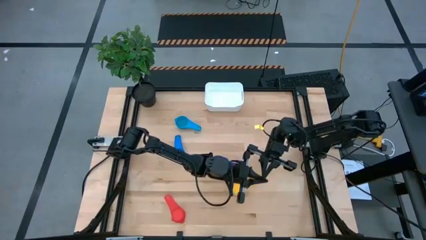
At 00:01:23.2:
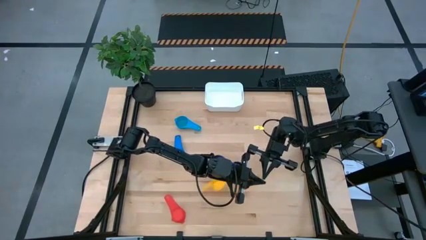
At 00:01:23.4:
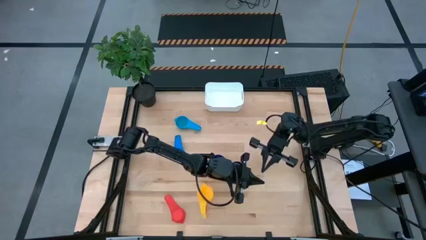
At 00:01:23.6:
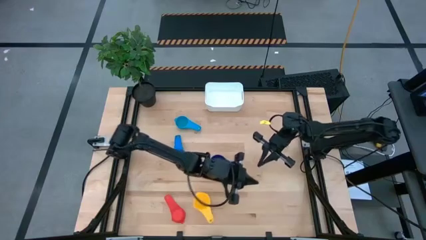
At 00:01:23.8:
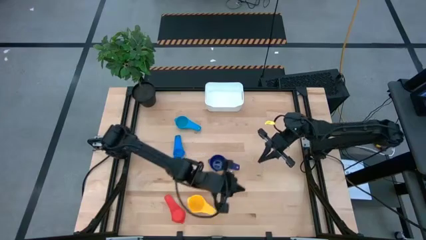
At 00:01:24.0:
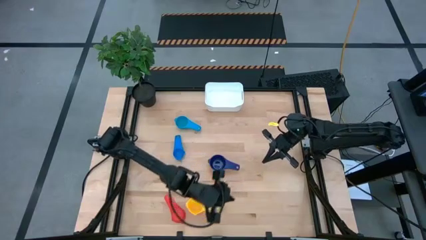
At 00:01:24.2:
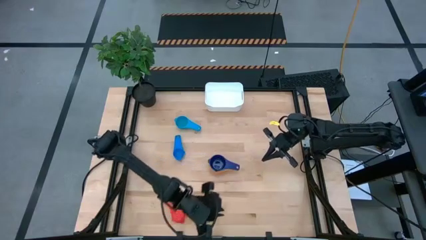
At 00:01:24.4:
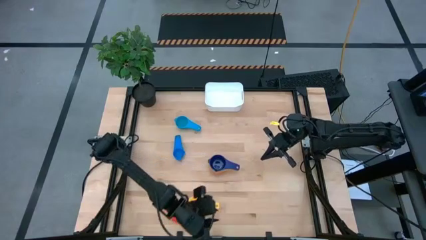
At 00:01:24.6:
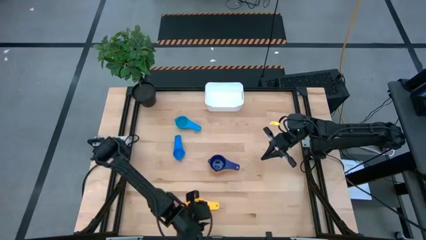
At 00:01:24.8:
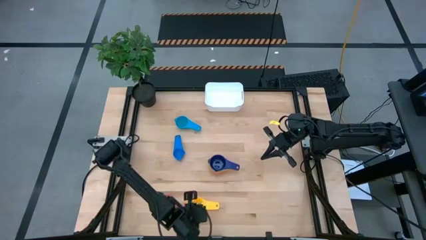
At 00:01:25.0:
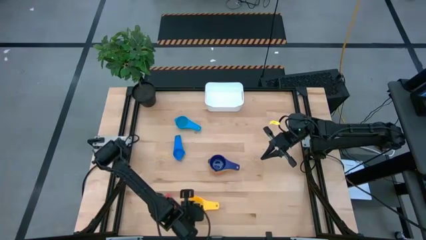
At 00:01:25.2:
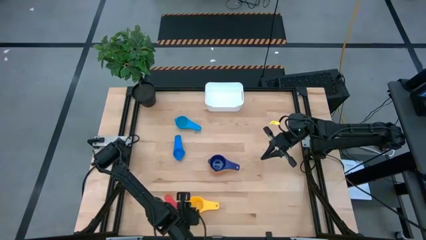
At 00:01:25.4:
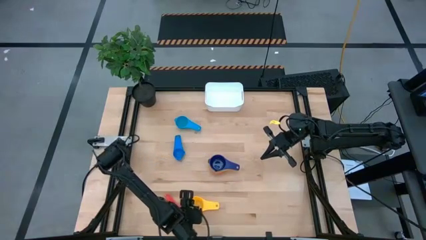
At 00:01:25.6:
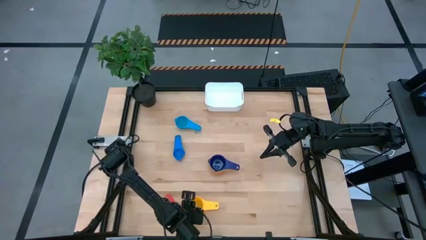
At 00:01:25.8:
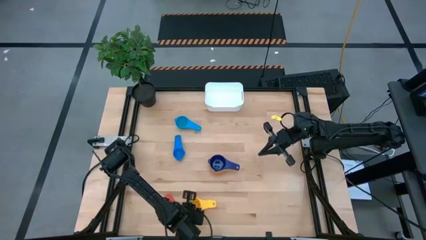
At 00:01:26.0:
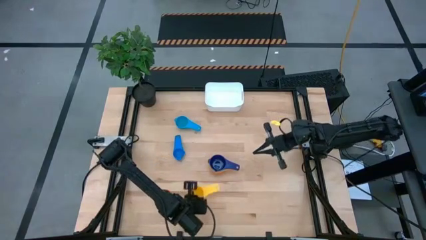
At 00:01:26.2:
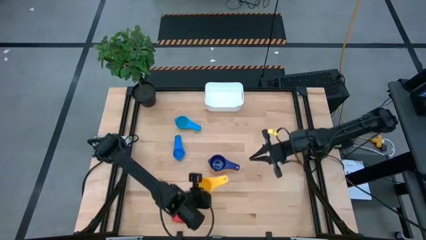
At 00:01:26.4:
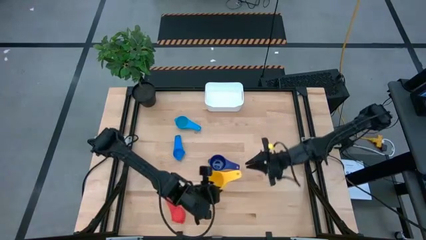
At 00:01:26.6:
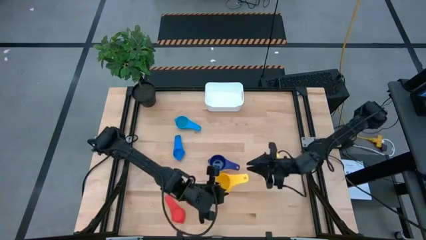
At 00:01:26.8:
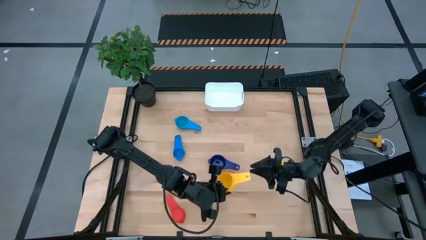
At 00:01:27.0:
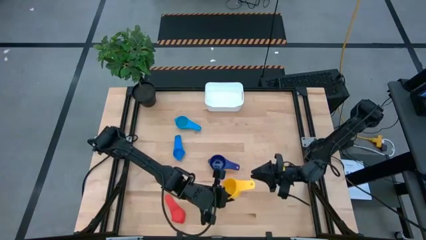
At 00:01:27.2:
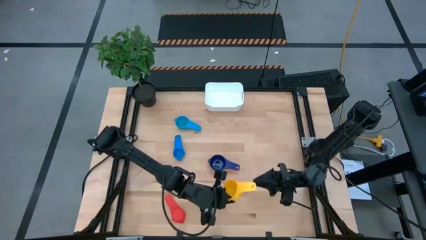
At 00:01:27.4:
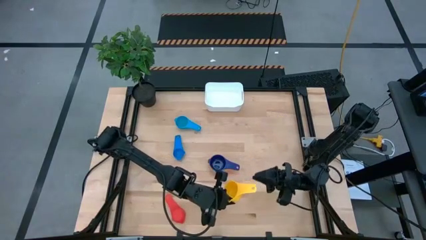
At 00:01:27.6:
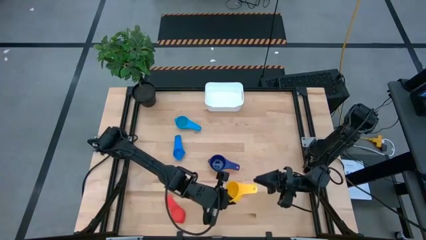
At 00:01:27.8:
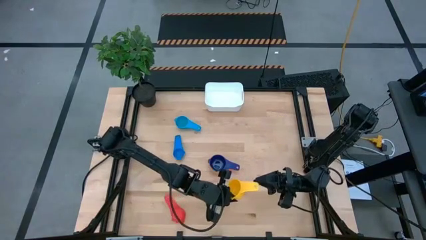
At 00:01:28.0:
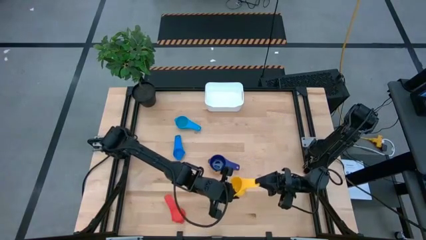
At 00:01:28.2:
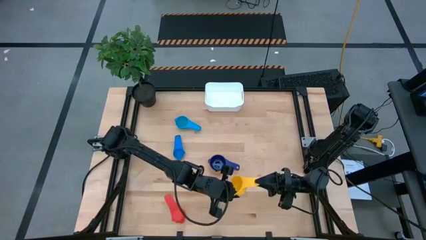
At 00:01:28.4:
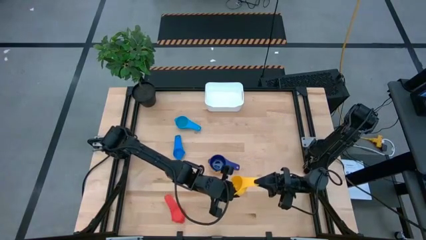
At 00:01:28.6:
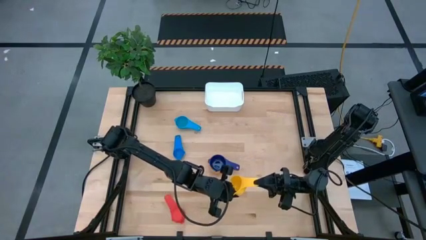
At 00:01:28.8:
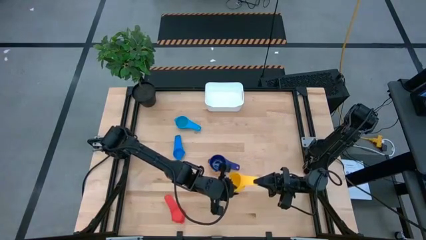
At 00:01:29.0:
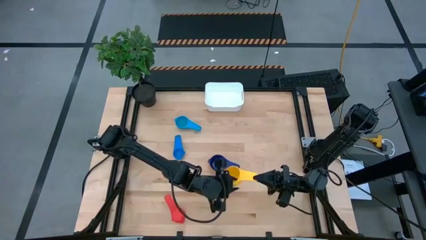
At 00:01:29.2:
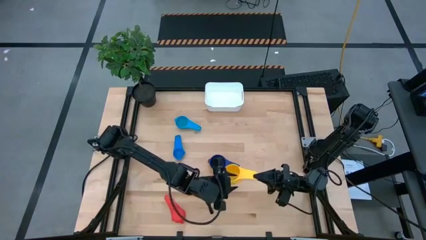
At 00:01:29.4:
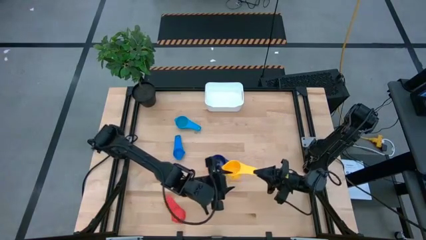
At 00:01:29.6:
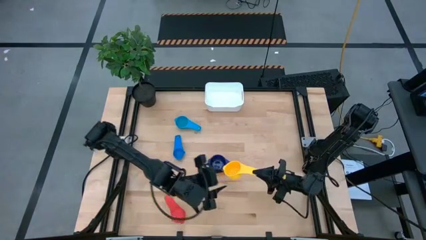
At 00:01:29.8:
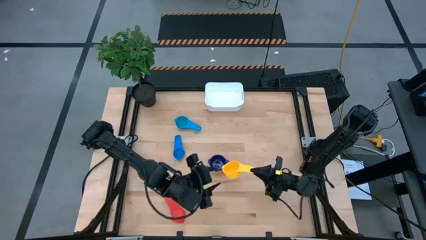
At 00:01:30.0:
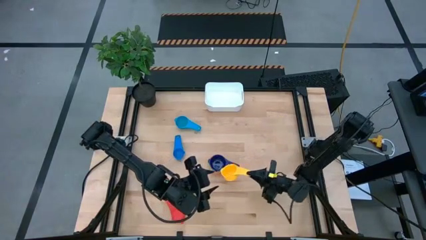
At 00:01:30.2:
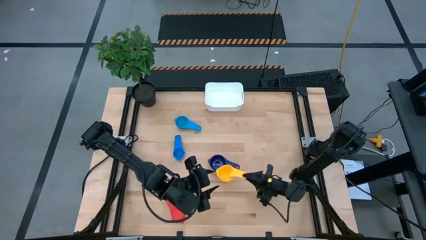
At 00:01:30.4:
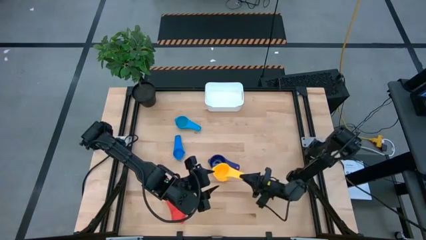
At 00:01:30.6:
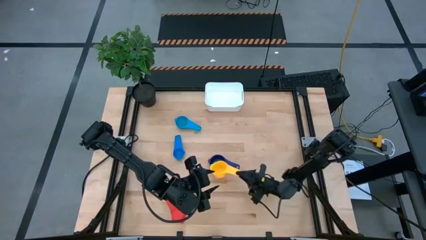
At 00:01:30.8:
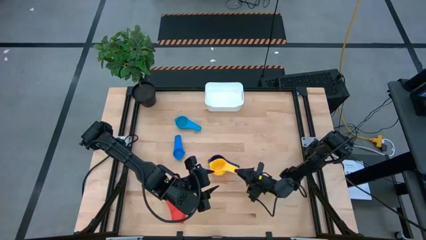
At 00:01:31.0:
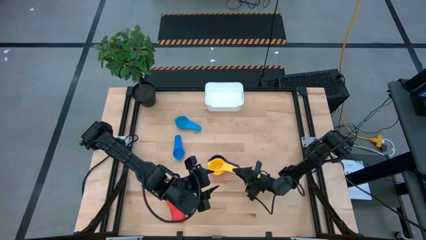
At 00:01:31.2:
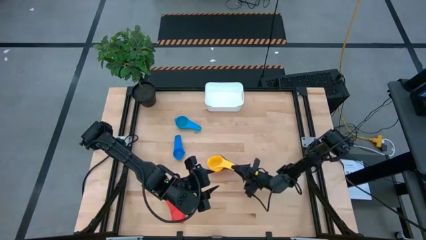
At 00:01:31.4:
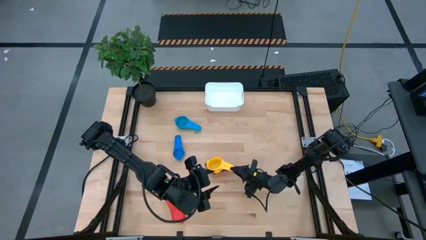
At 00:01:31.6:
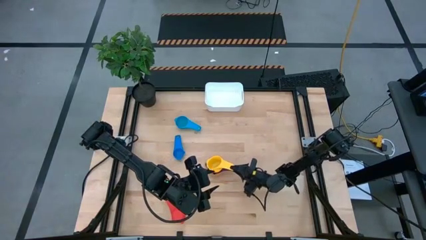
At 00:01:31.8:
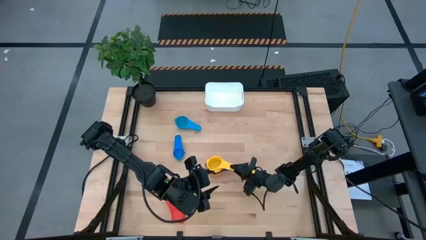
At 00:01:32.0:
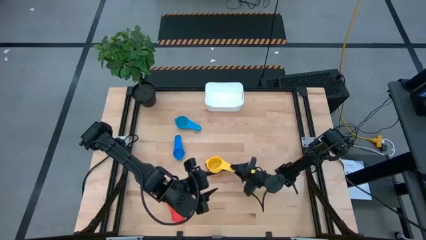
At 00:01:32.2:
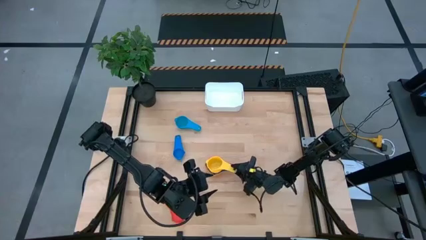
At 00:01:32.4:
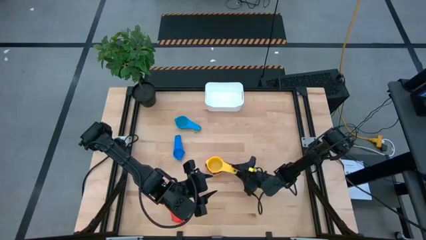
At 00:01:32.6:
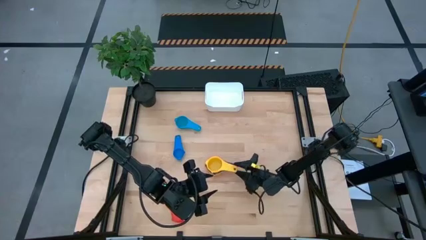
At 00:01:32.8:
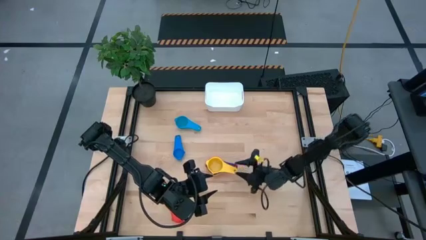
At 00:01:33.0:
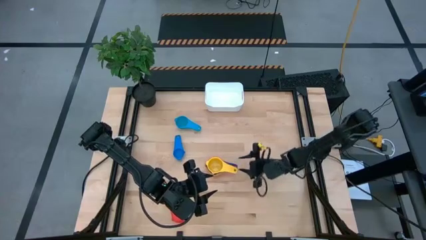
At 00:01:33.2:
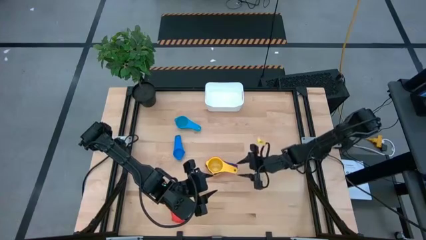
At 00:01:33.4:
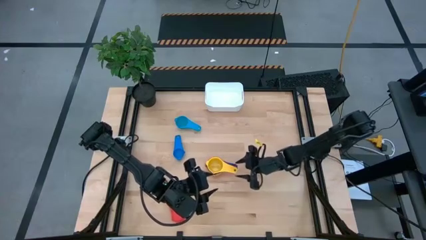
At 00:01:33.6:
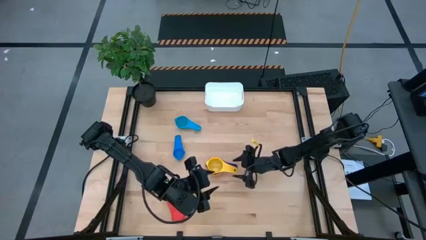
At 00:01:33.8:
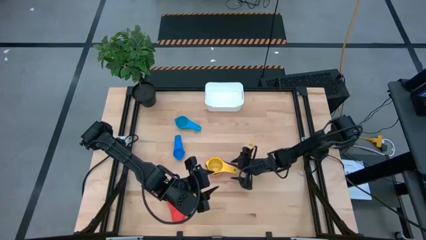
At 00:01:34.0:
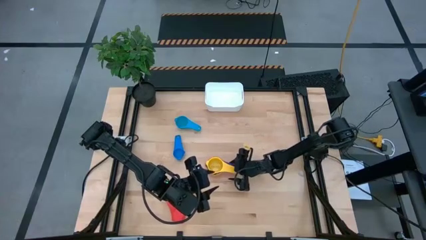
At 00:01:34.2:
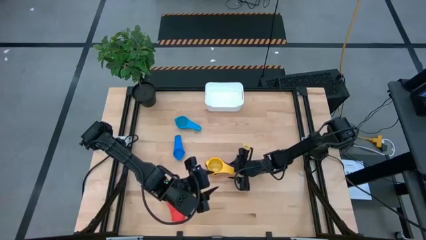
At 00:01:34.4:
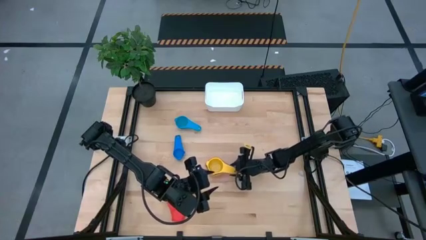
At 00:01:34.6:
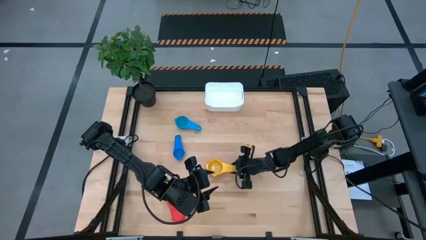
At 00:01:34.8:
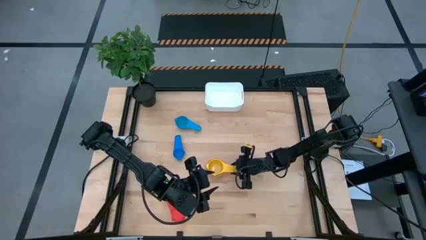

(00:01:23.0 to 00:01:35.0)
Task: Nest measuring cups in basket
Stack the yellow measuring cup on top of the dark blue measuring cup

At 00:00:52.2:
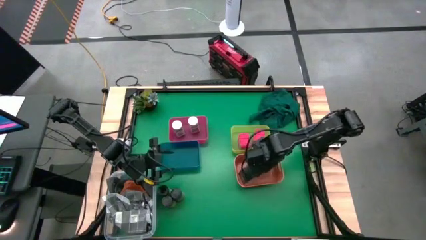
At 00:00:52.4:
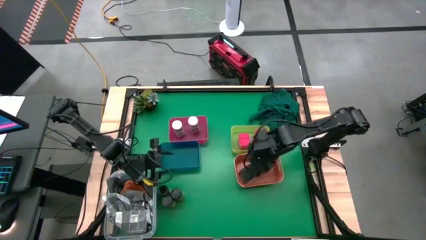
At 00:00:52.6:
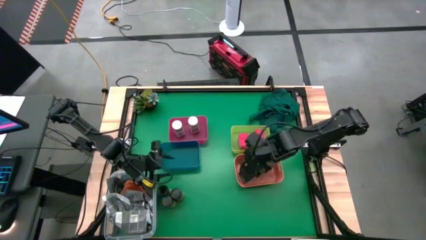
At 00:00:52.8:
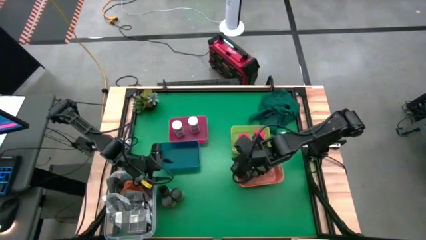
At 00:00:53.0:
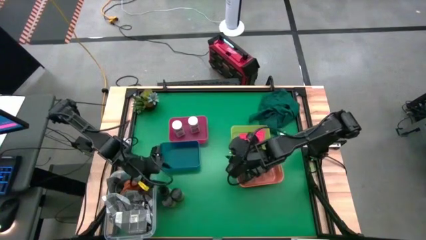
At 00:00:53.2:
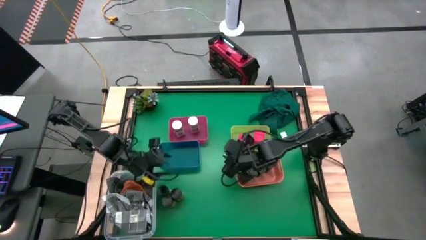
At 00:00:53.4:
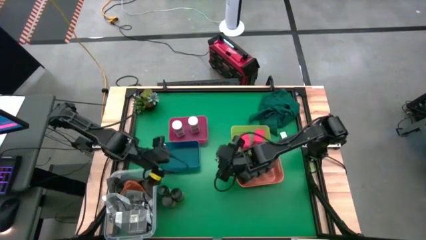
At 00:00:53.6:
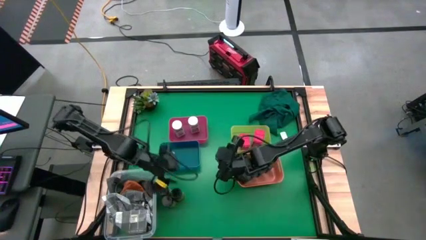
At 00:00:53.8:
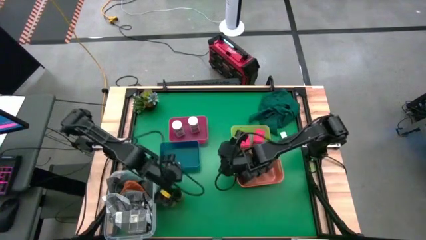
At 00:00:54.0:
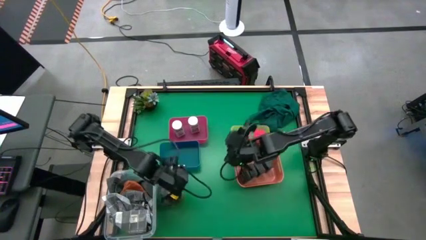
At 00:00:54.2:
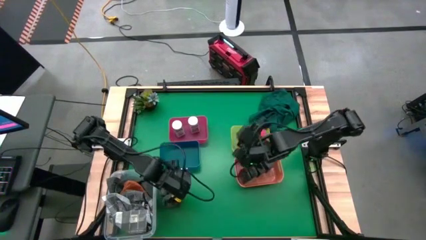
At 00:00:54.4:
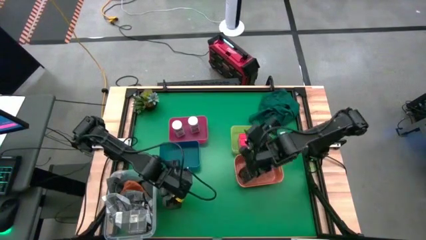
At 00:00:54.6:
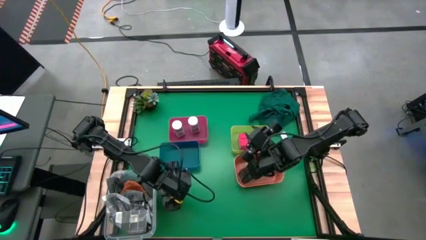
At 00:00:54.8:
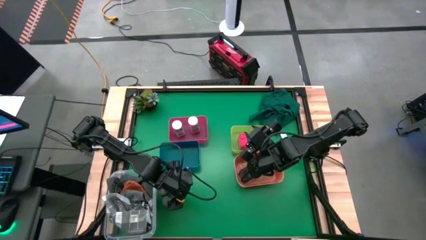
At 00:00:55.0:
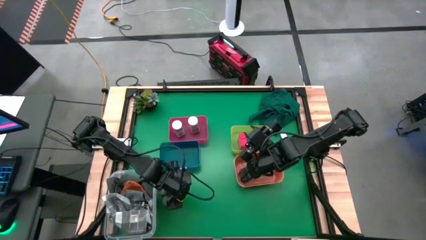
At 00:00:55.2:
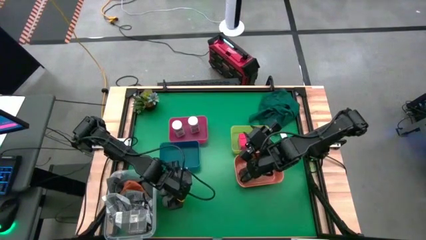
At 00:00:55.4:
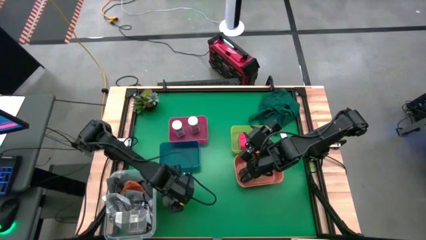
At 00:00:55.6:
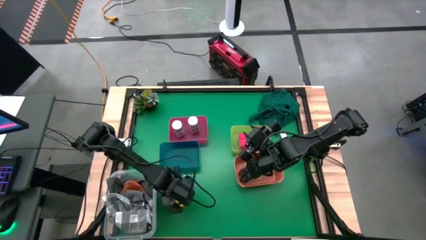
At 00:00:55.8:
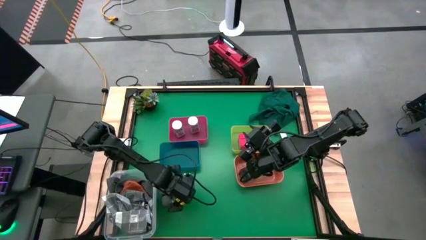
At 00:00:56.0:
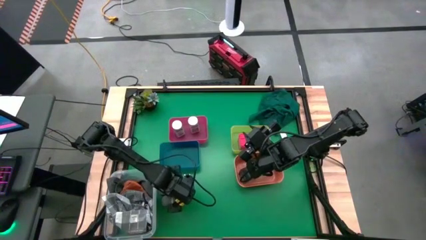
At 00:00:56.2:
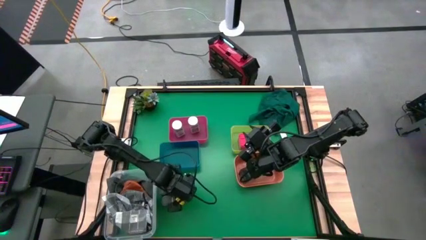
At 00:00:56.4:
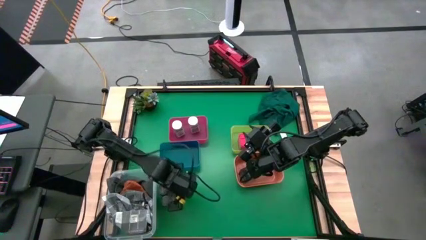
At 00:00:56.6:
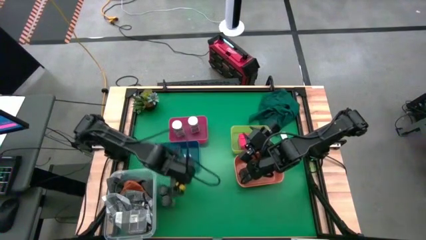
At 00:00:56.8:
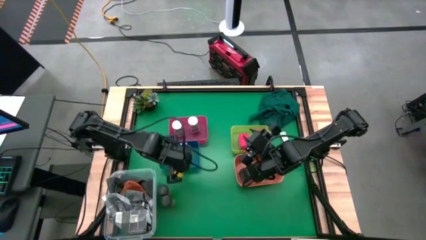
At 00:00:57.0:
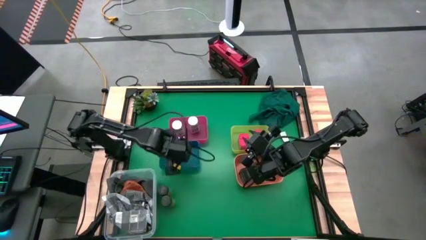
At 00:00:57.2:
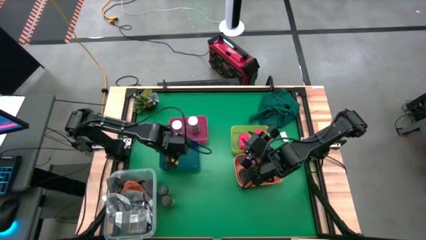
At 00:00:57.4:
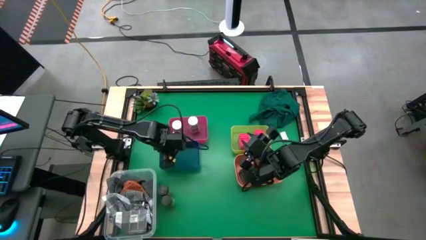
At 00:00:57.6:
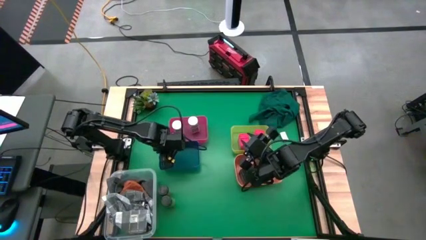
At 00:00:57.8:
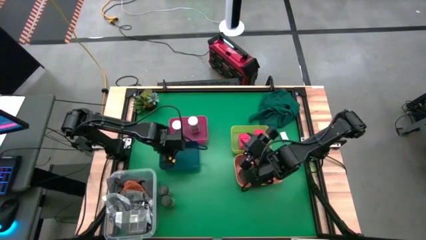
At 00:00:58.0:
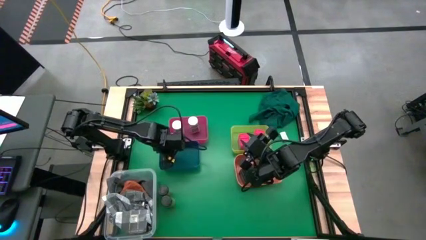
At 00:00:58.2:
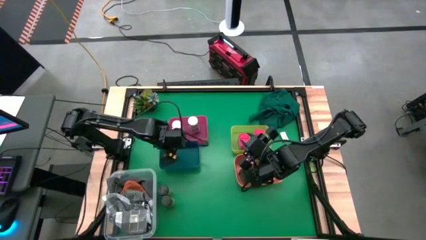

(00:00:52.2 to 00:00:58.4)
Task: Sort spices by type
Put the right black seasoning bottle into the blue bin
